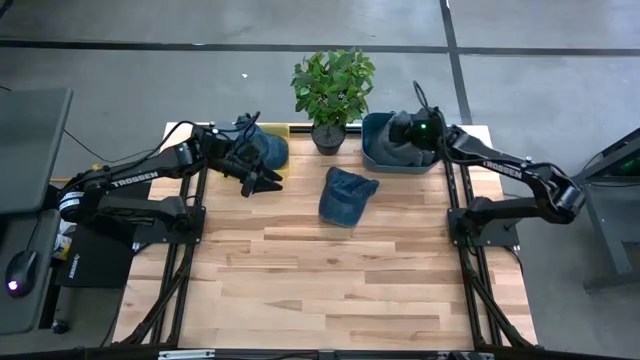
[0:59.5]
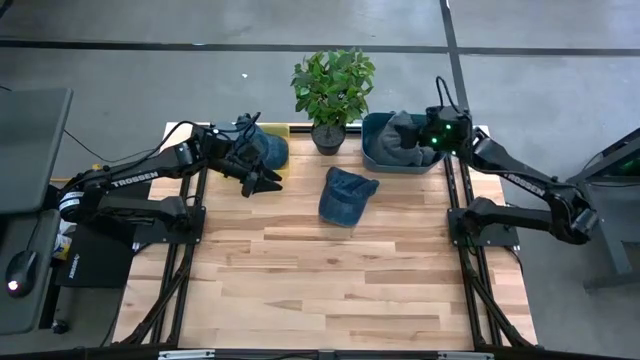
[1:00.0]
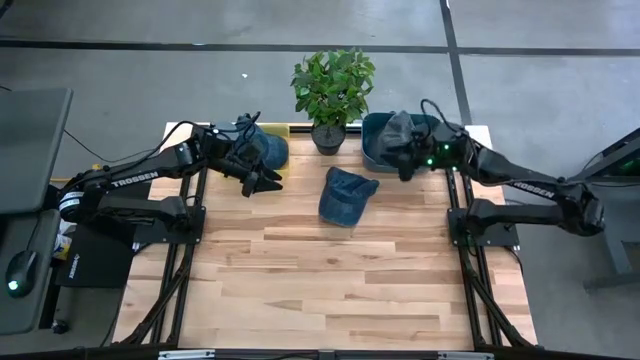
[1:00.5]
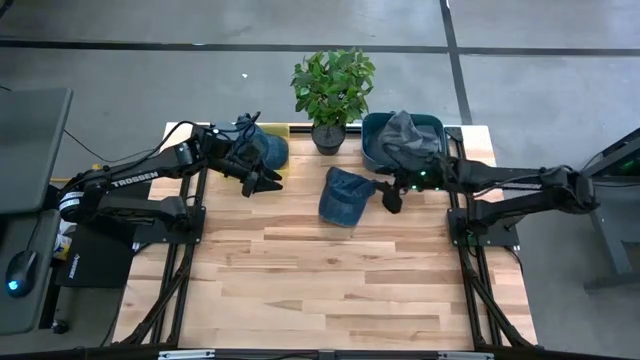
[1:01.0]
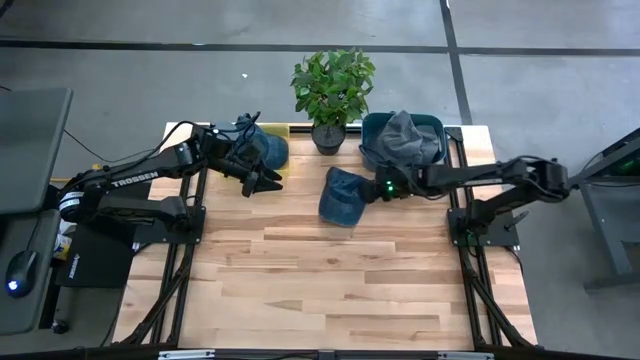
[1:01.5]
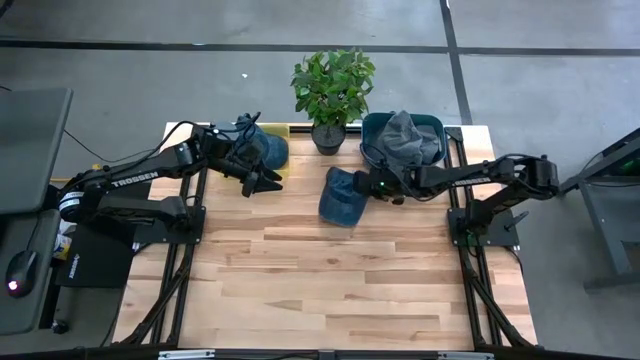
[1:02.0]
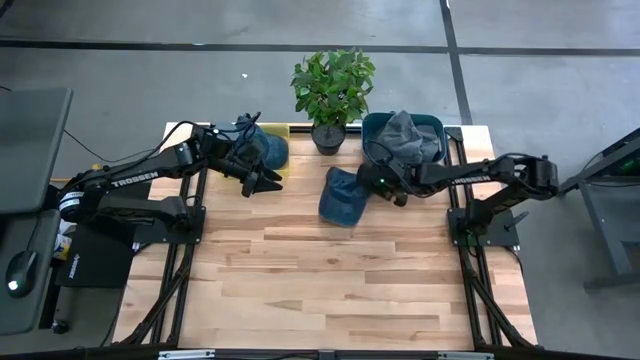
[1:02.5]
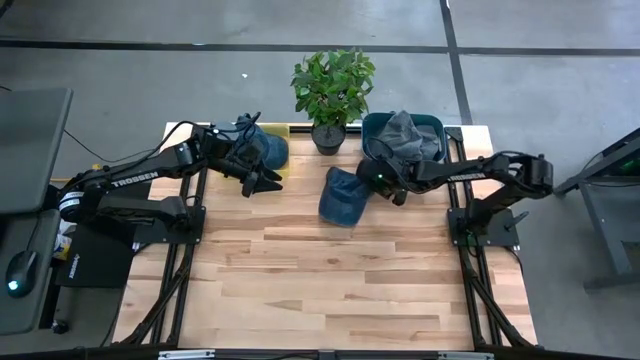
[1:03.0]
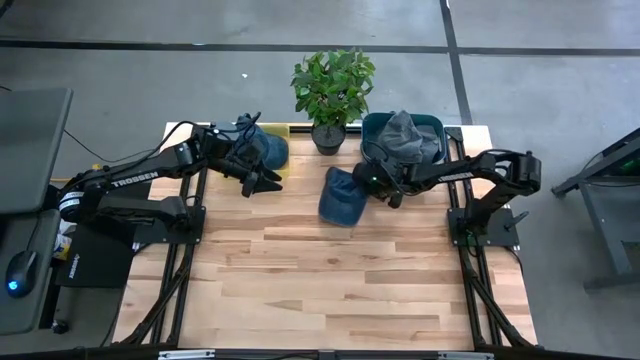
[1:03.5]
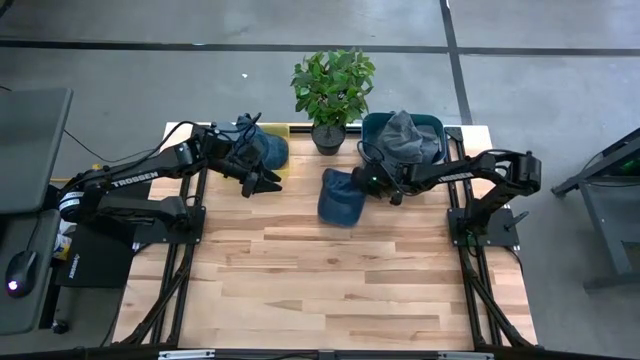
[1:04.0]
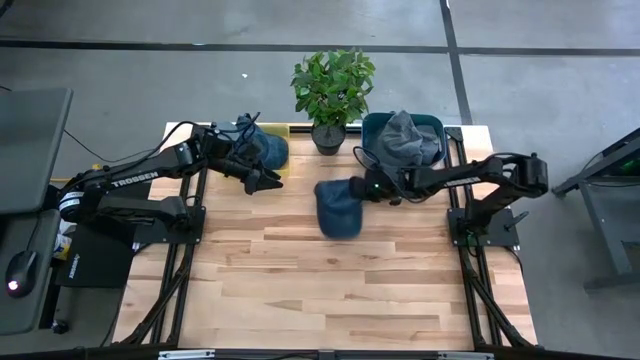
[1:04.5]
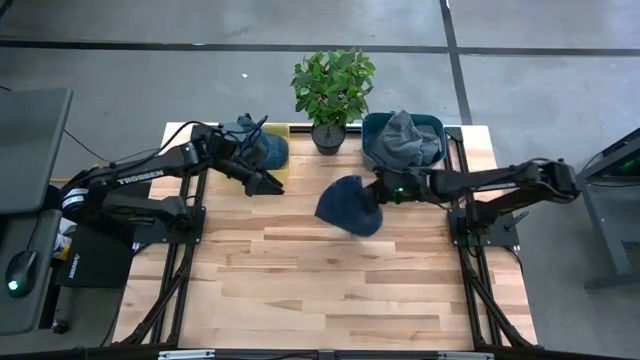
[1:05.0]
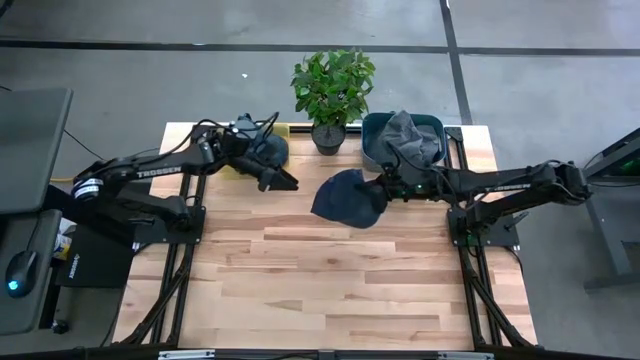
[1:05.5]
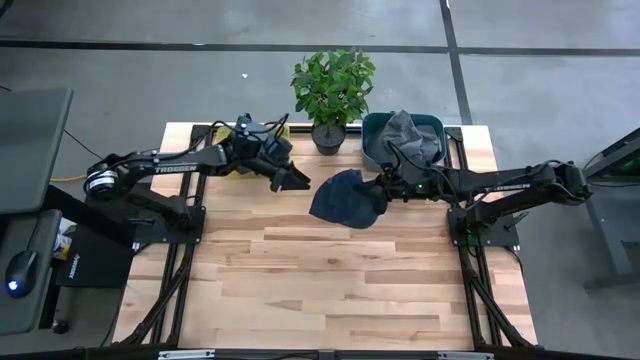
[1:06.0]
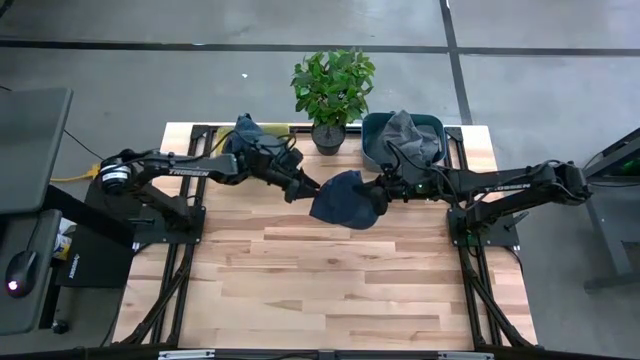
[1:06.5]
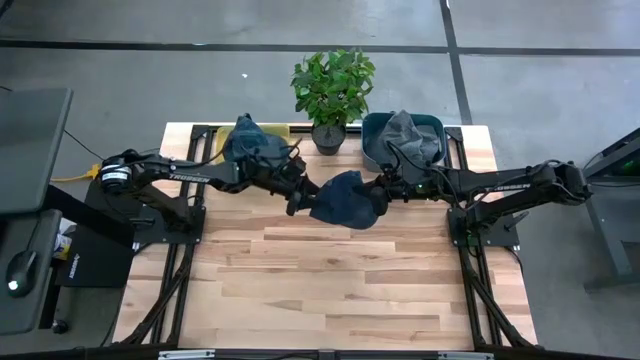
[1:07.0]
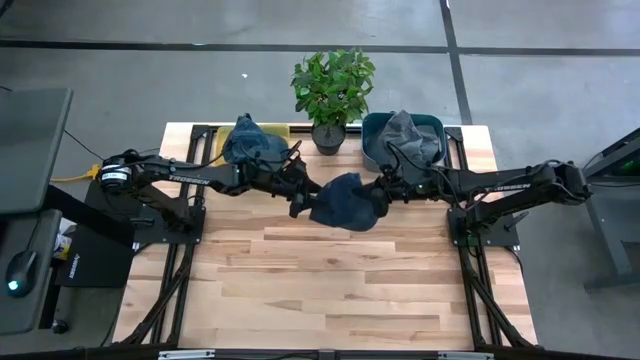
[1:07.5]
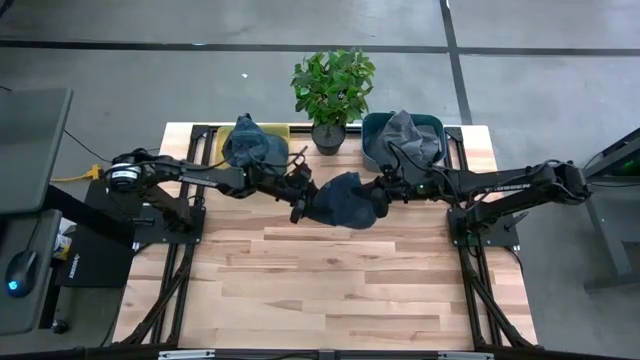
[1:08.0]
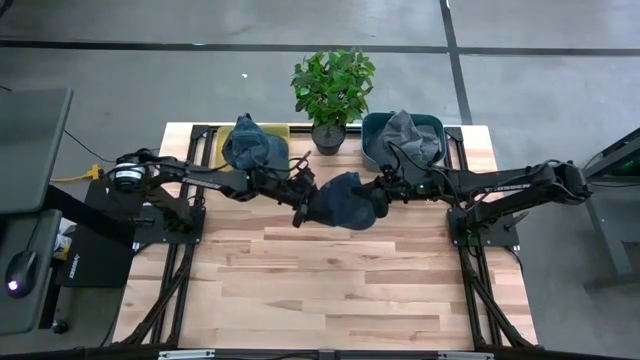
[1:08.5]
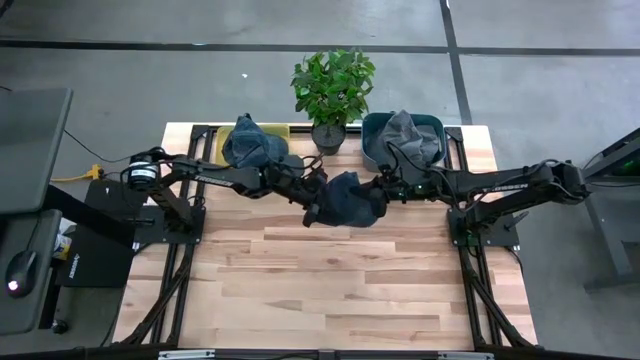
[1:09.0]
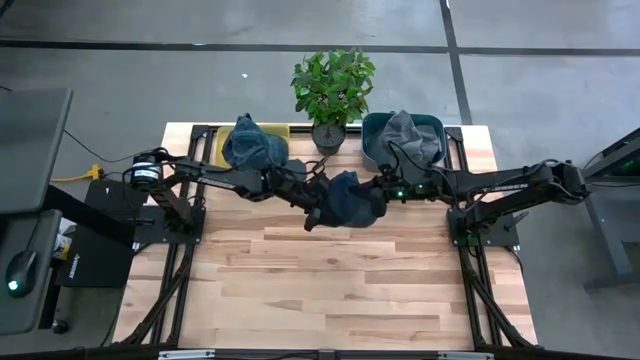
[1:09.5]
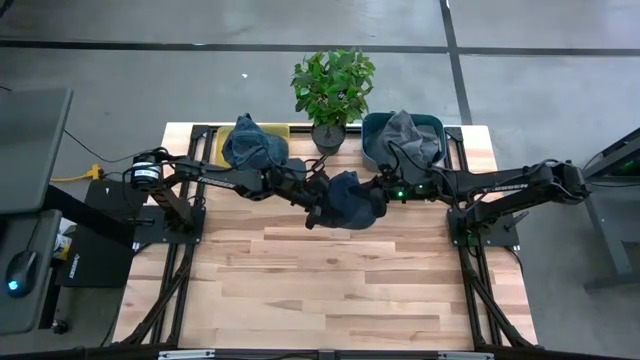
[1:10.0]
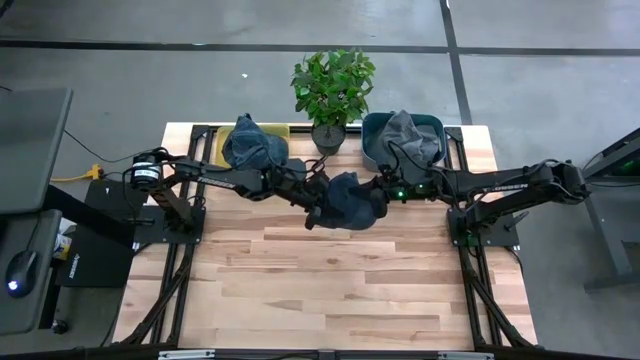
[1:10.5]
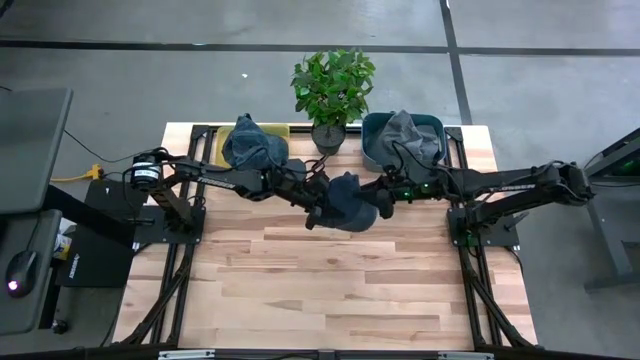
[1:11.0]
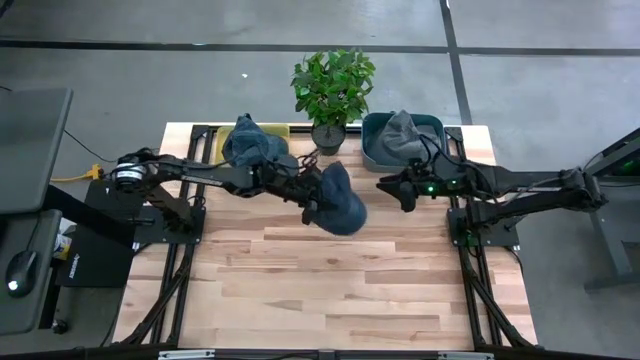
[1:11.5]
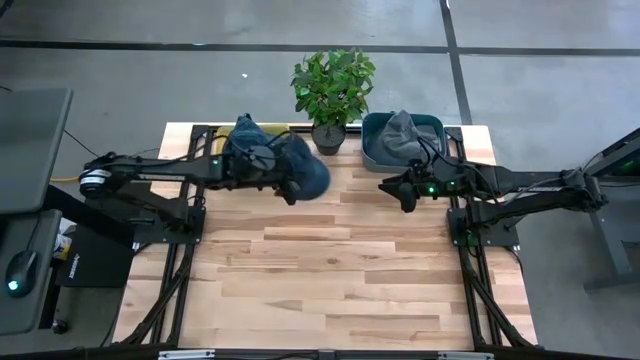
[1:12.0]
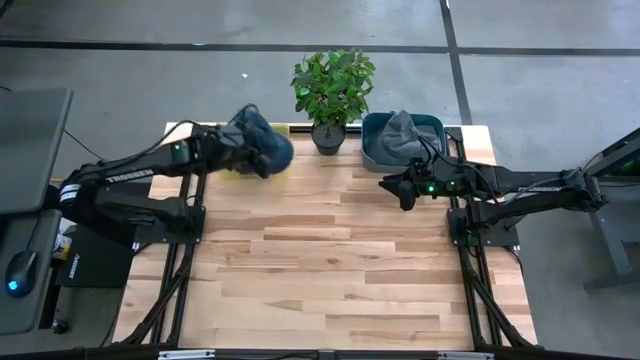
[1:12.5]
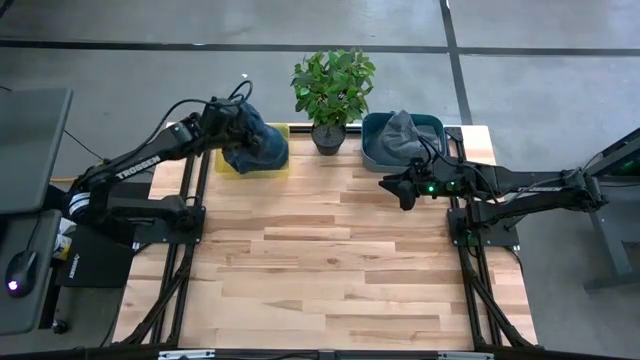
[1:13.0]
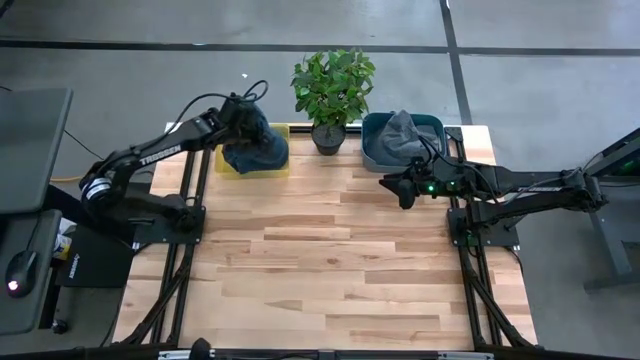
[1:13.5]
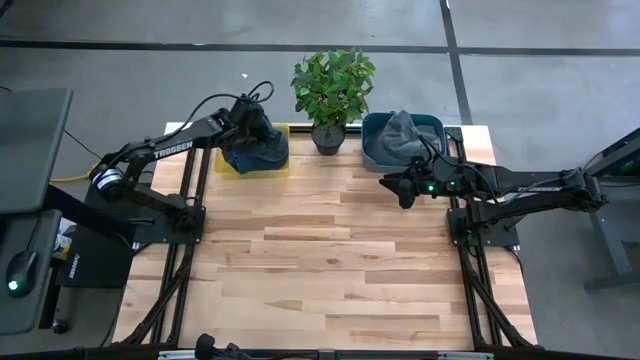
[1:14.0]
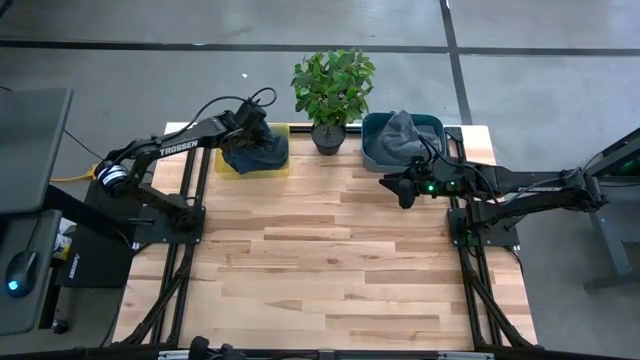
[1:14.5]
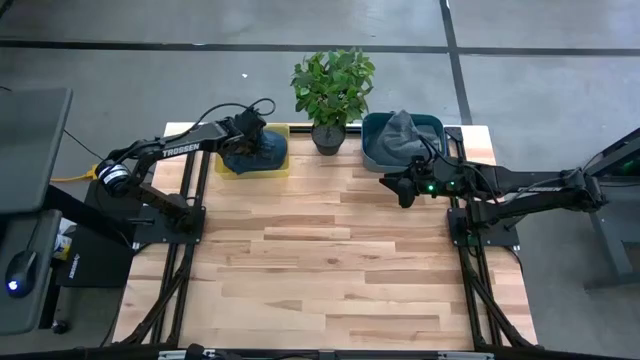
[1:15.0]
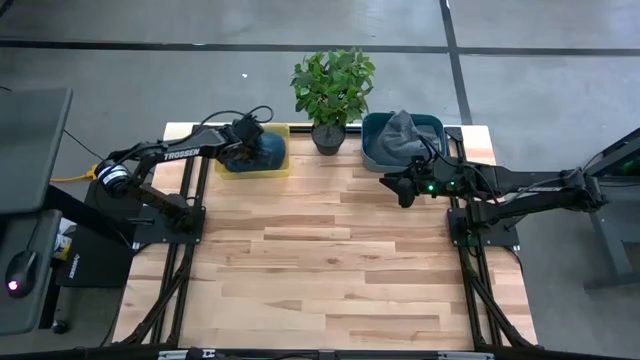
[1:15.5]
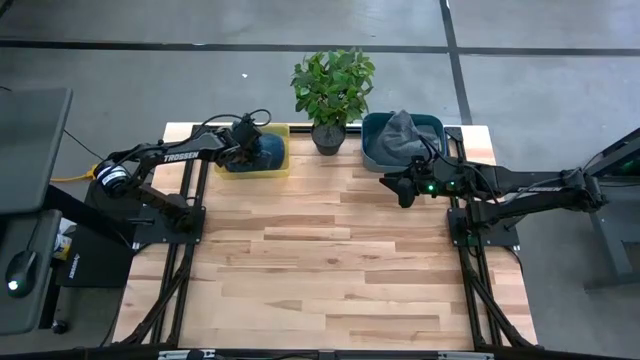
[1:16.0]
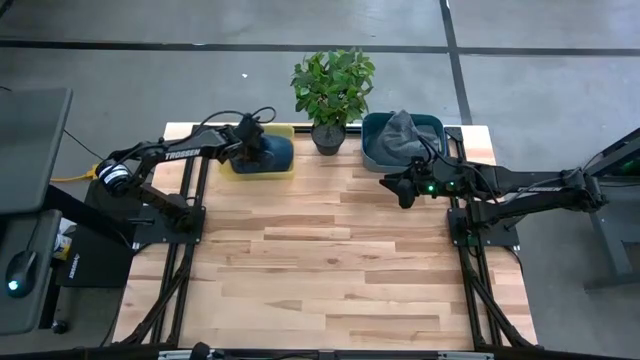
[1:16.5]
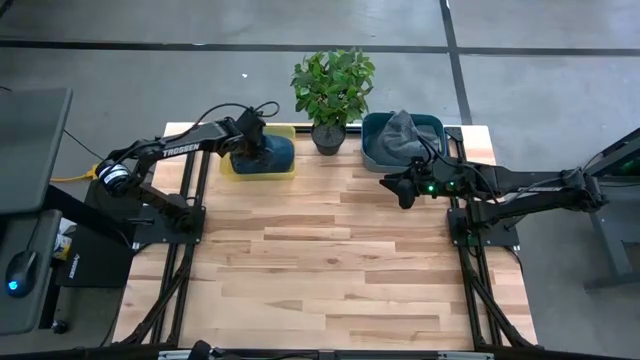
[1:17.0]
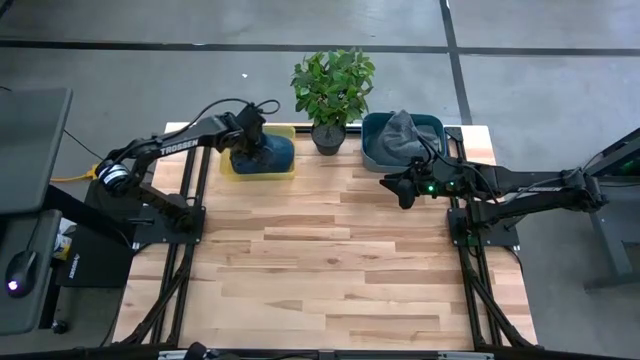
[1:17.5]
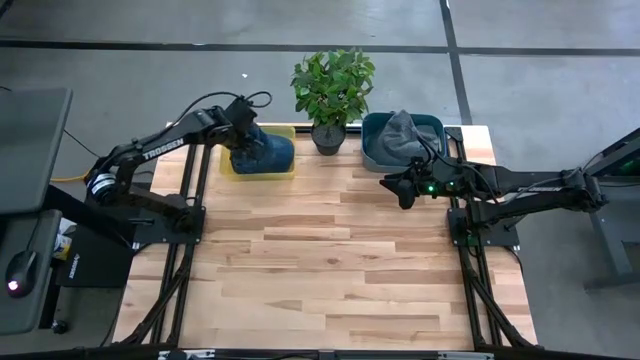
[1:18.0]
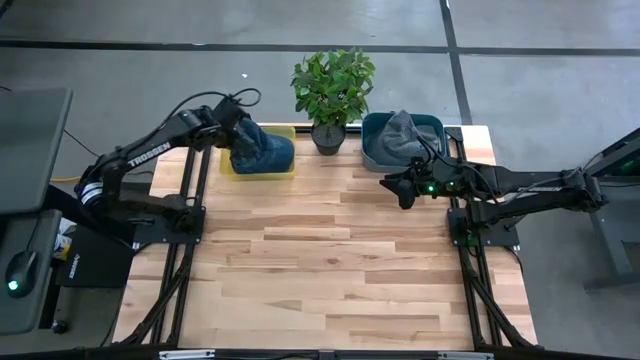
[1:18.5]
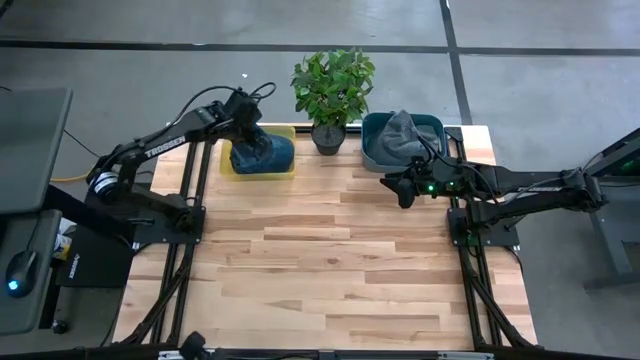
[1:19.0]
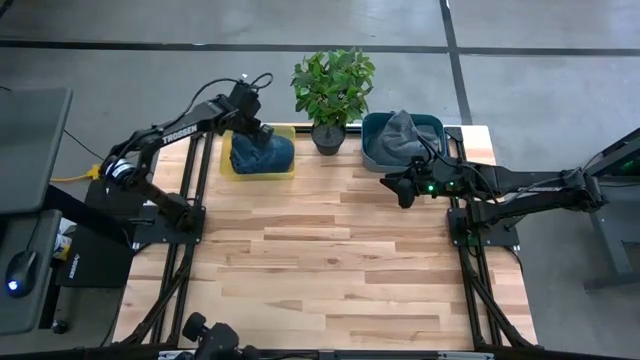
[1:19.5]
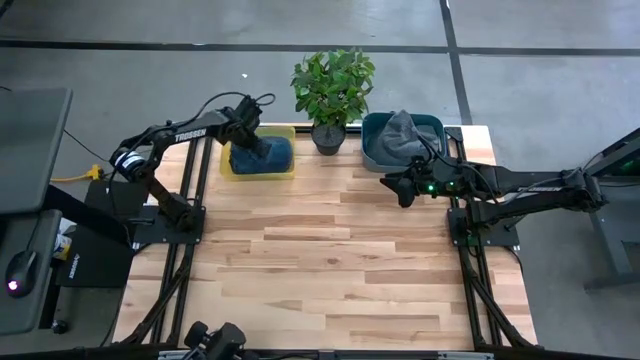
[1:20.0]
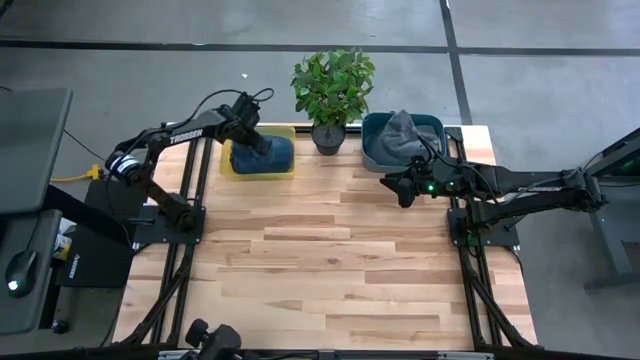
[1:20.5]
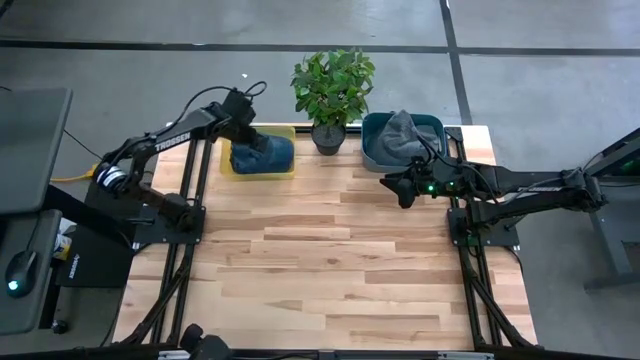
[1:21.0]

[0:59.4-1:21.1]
Task: Pick & Place hat
Put the black cap into the yellow bin
